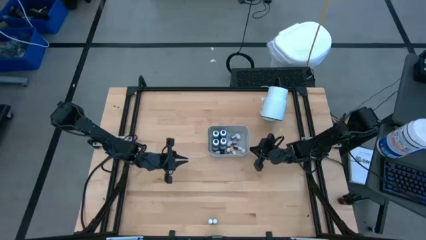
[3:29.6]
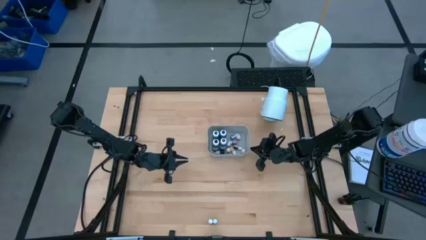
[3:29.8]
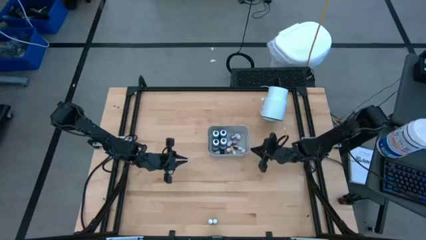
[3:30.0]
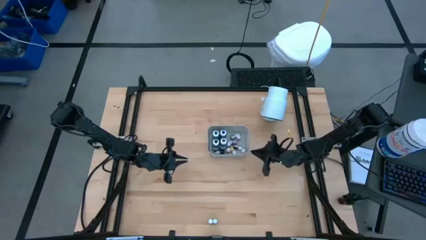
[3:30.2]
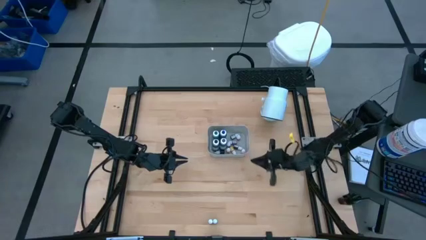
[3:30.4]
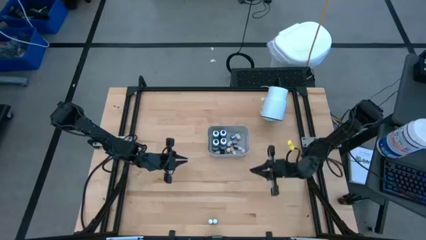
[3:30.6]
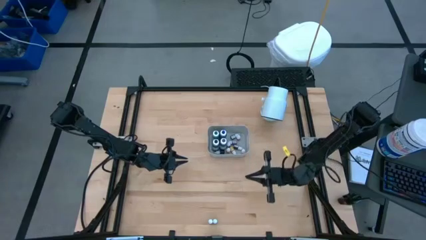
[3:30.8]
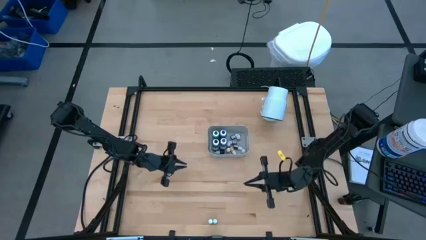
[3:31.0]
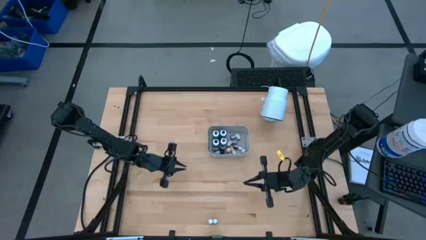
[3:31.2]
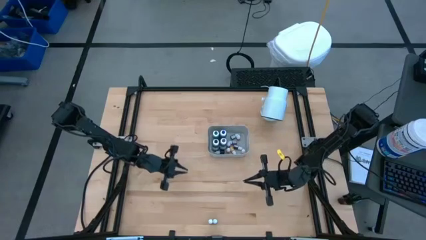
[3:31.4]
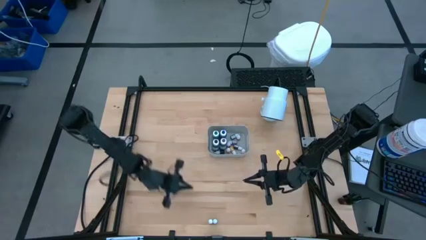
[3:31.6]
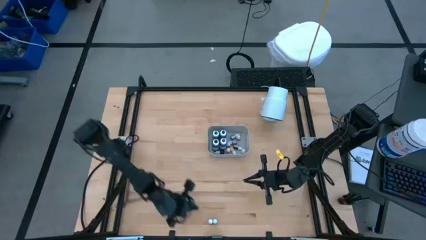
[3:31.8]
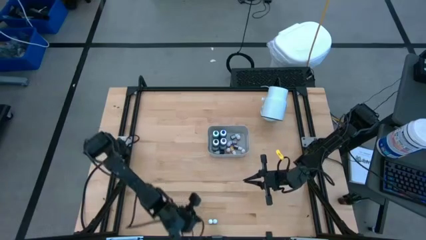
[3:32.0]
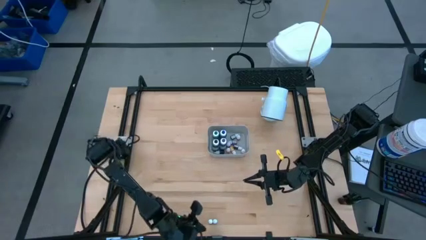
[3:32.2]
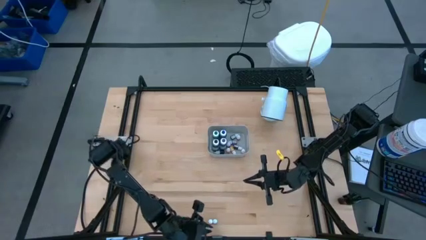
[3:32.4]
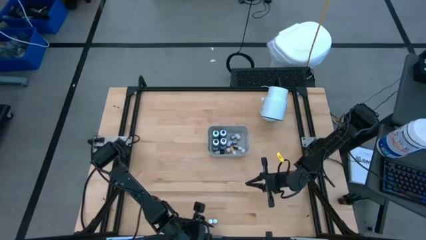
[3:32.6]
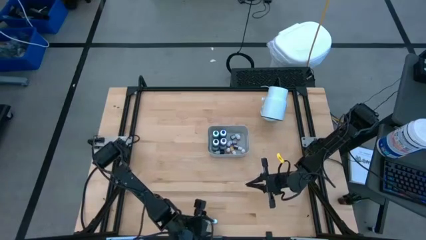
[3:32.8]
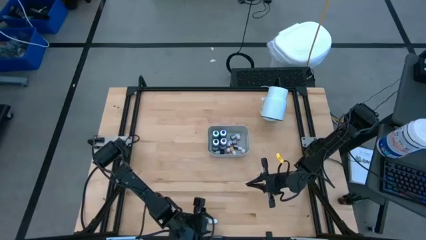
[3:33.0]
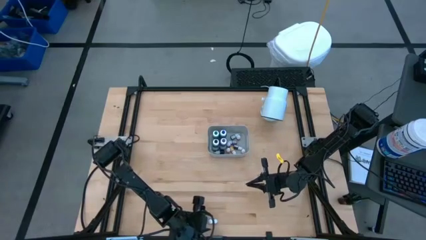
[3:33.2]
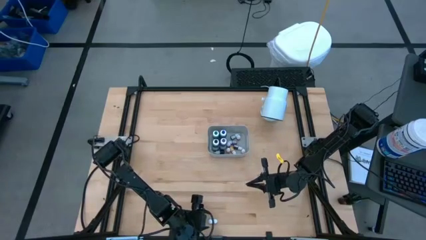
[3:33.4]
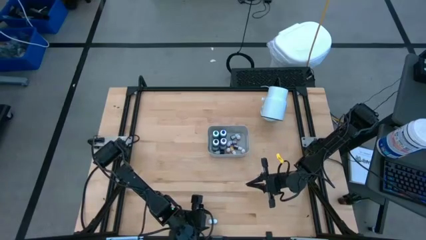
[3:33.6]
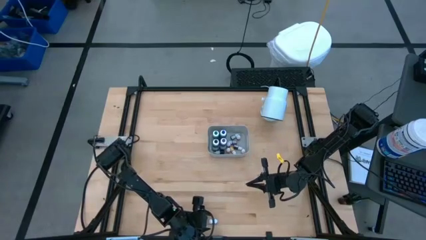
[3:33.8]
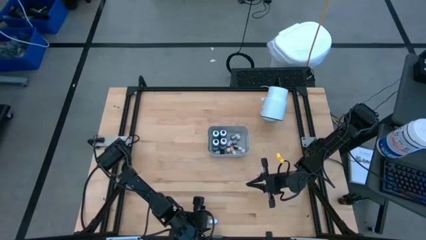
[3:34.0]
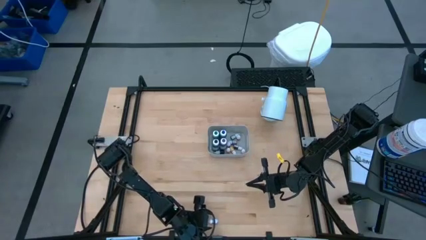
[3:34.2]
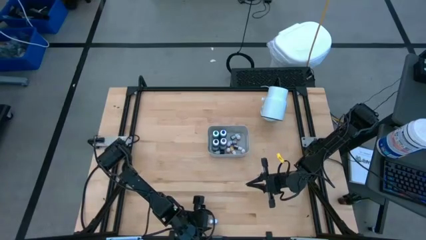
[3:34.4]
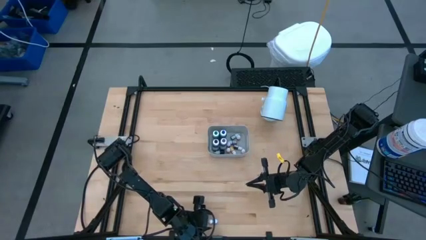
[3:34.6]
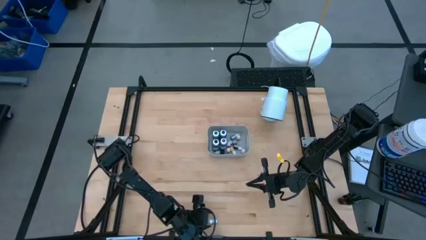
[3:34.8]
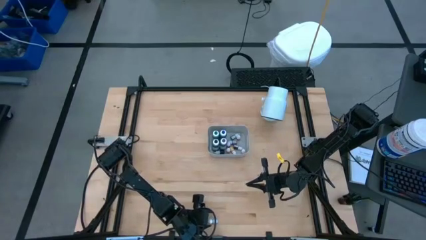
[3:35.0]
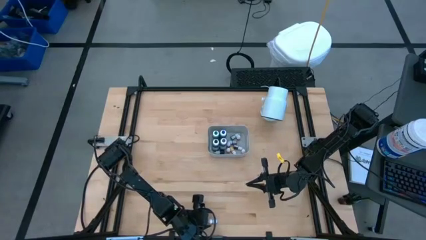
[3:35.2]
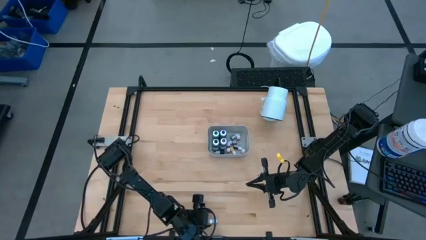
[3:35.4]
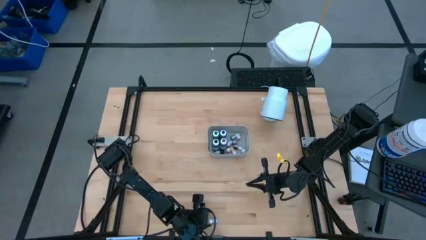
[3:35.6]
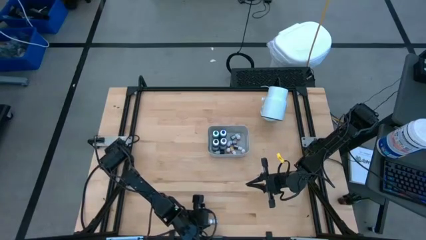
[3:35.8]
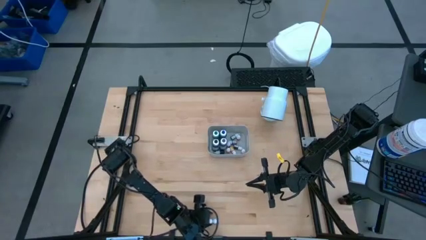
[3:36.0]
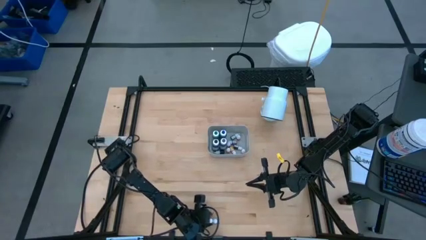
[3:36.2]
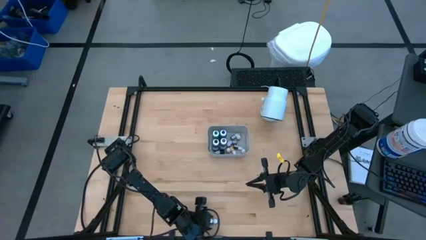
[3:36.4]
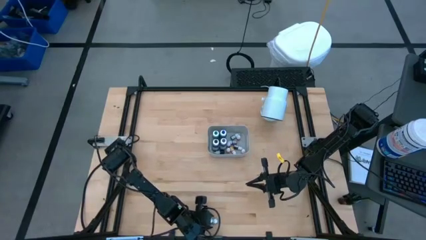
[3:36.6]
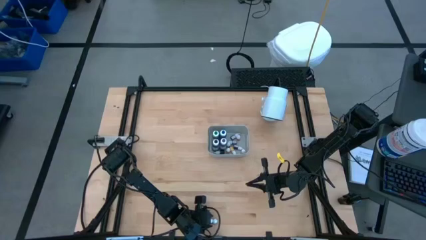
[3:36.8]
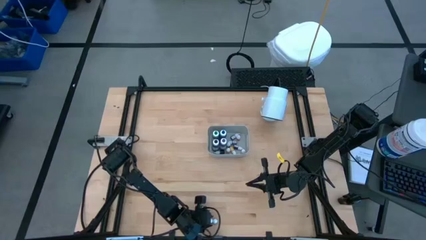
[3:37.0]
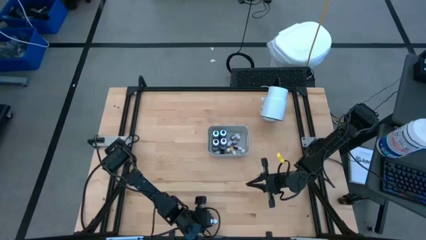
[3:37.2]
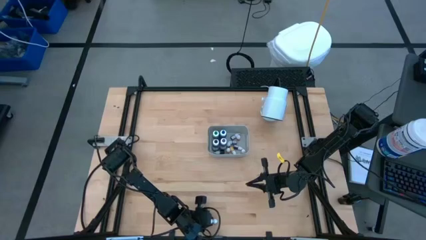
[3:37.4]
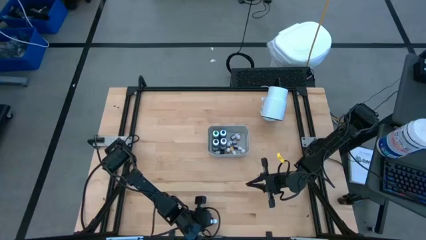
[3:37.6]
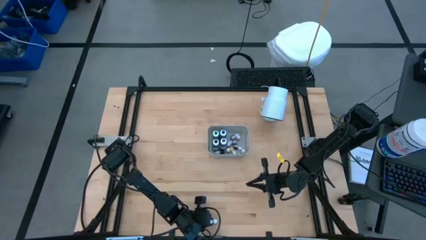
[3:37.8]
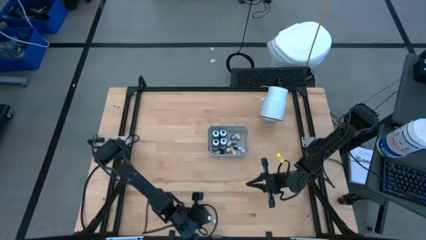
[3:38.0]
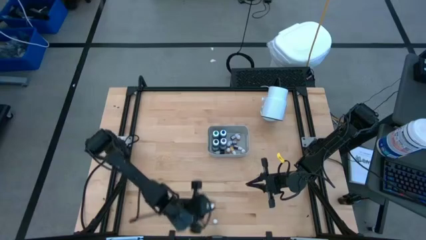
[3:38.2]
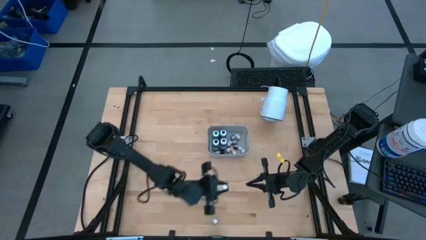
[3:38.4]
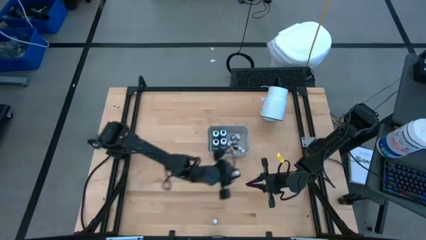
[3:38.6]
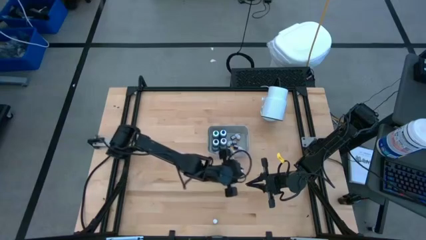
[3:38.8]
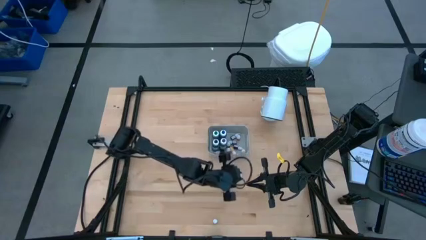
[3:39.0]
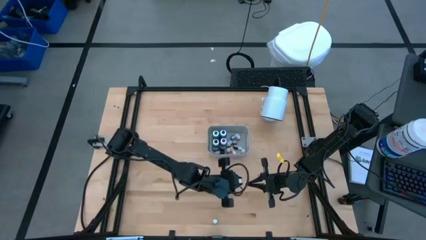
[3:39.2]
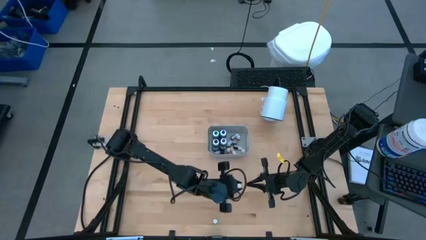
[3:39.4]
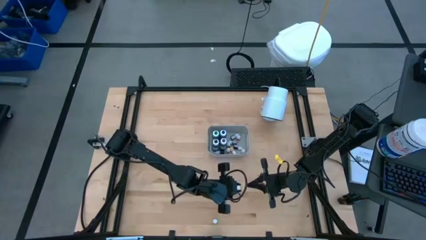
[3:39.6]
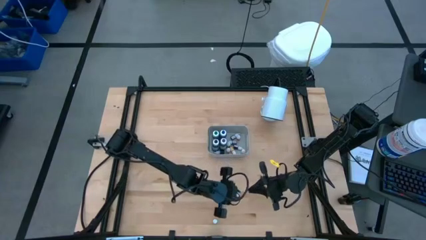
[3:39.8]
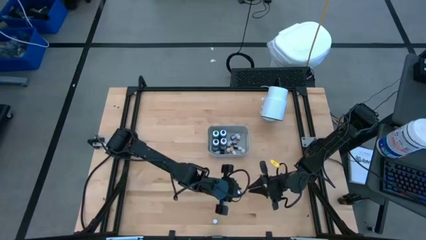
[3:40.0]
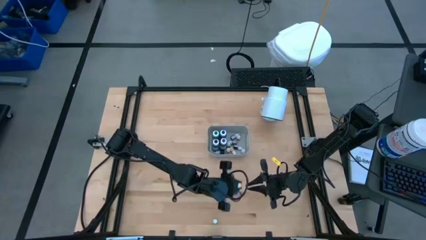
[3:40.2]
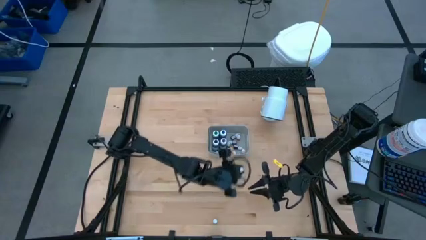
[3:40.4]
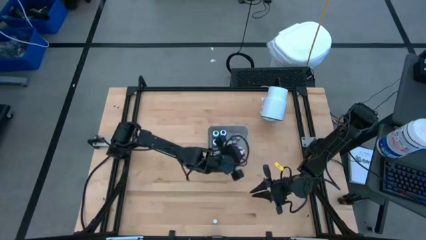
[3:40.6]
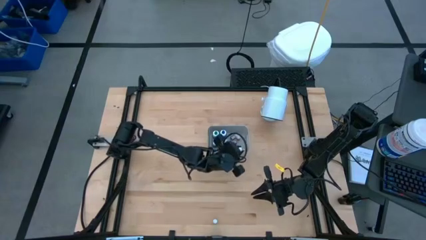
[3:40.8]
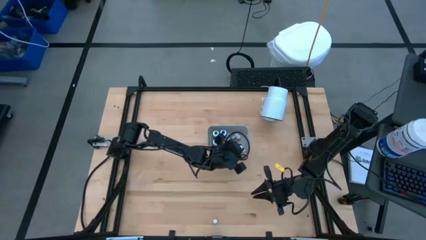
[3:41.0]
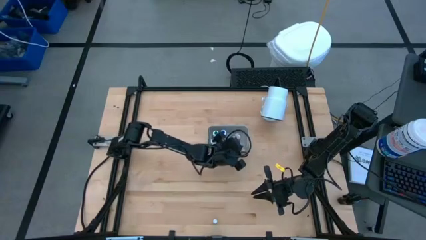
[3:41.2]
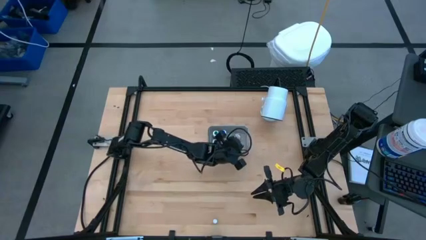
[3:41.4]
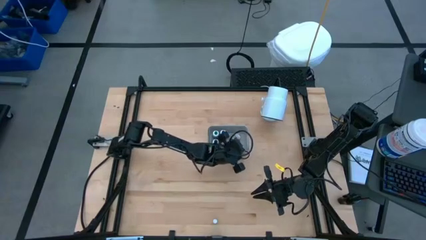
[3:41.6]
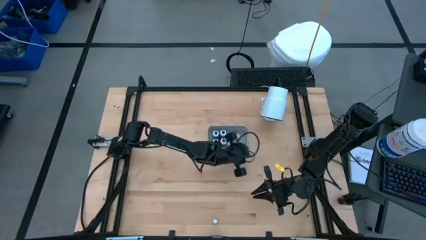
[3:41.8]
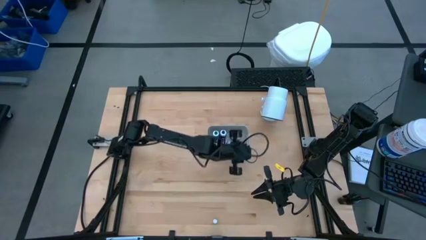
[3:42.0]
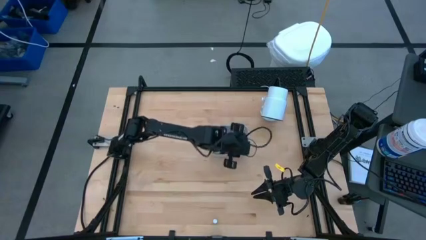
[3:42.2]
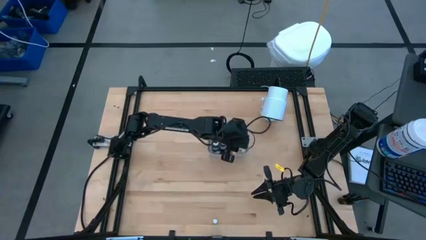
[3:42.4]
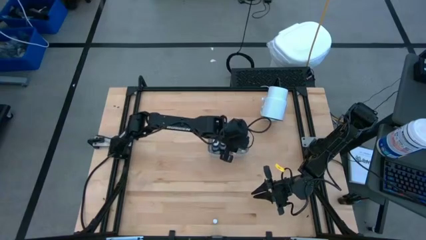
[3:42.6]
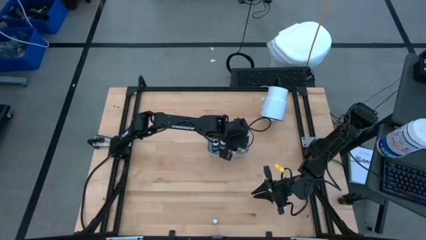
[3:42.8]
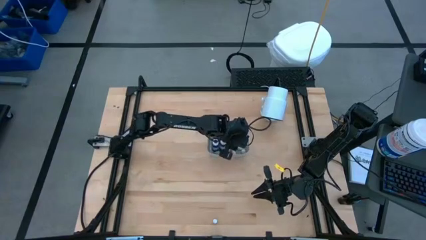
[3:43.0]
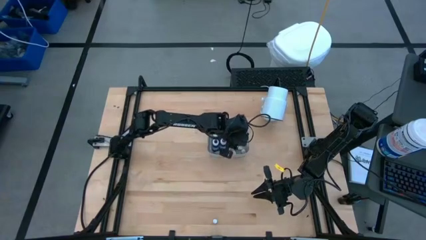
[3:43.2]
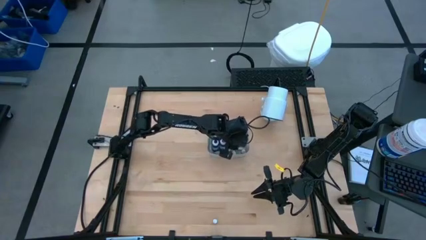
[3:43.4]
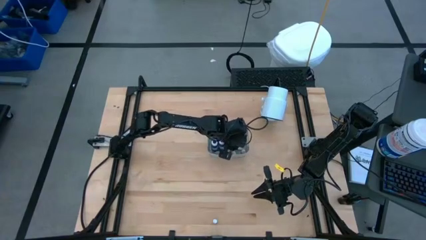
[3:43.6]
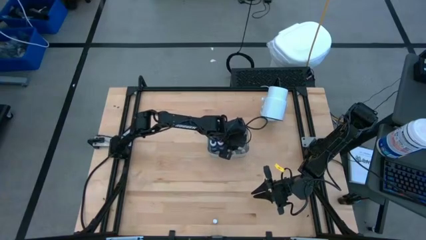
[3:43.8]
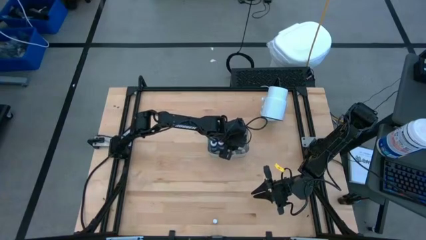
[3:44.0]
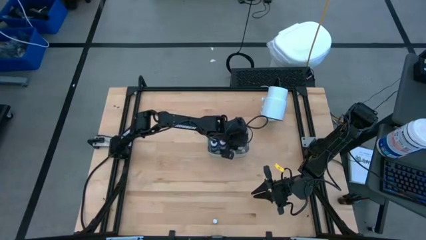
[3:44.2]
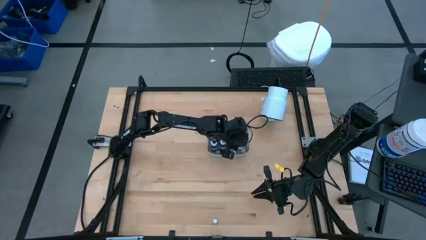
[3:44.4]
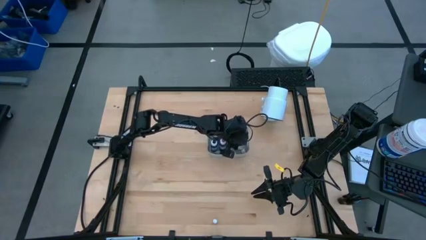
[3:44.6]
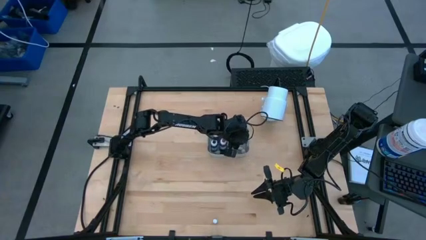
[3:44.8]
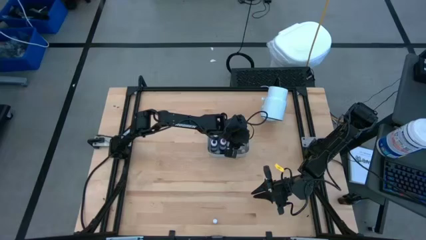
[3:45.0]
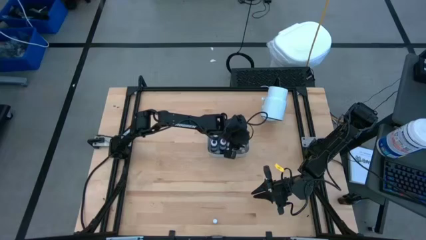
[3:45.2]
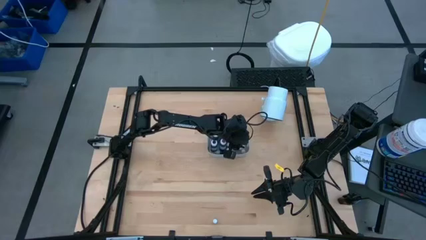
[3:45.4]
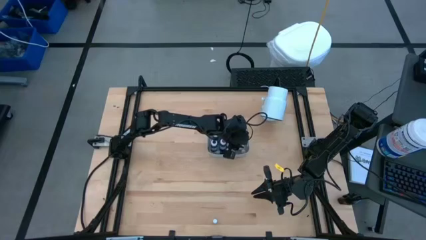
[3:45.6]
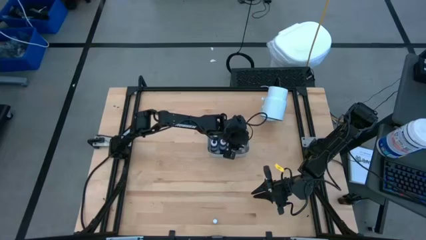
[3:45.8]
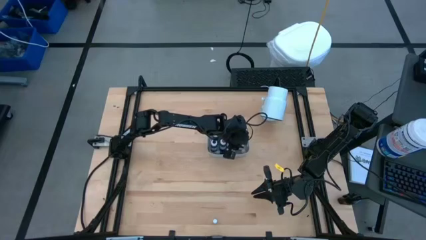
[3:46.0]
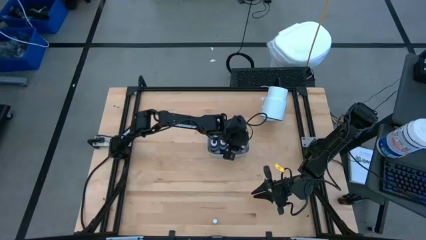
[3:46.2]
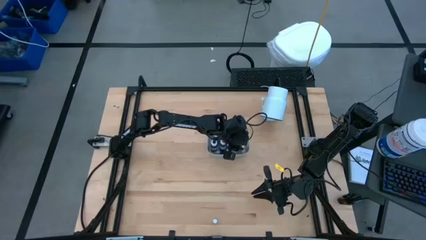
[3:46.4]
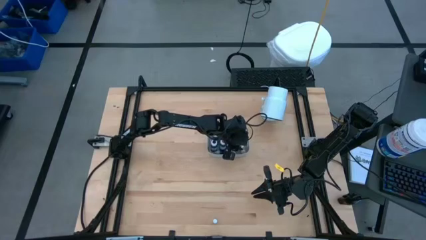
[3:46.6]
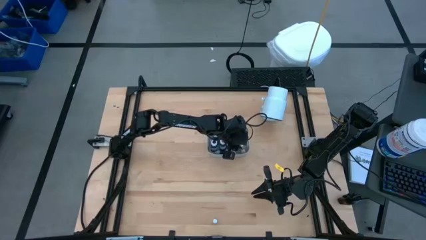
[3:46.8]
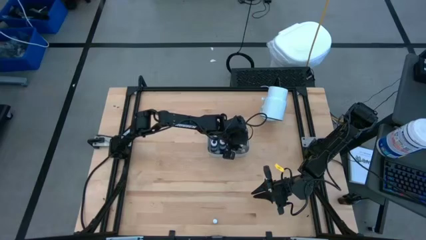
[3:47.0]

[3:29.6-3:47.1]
Task: Pick & Place food coloring
Put the small red food coloring bottle into the gray bin
